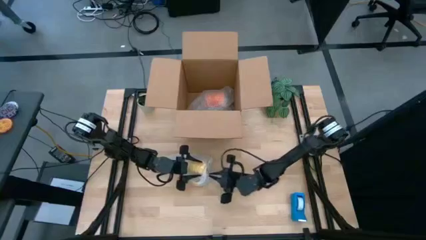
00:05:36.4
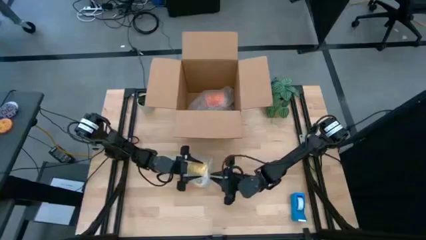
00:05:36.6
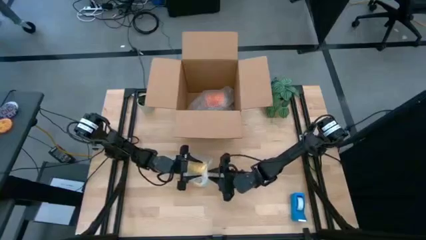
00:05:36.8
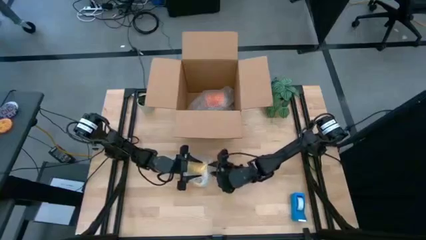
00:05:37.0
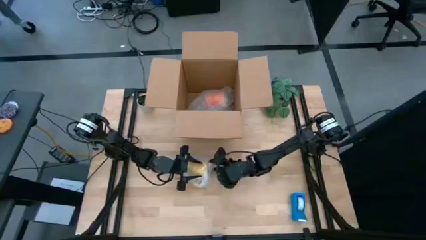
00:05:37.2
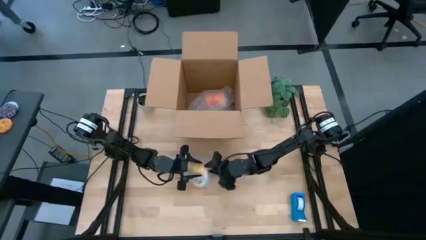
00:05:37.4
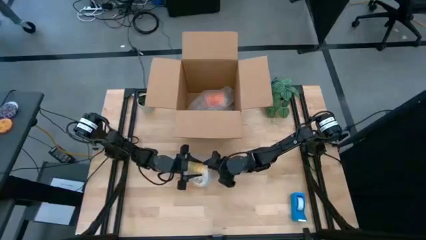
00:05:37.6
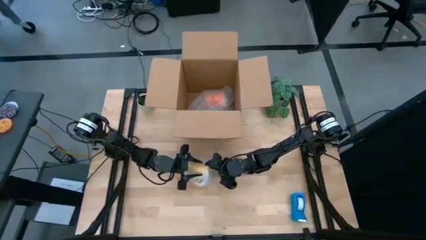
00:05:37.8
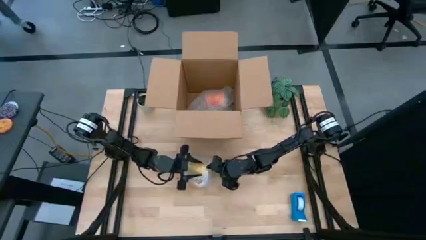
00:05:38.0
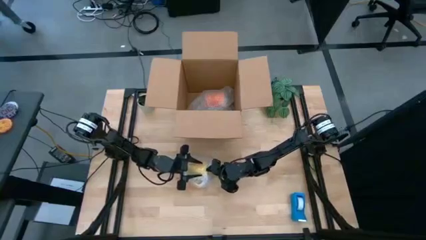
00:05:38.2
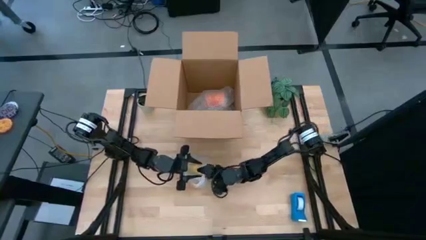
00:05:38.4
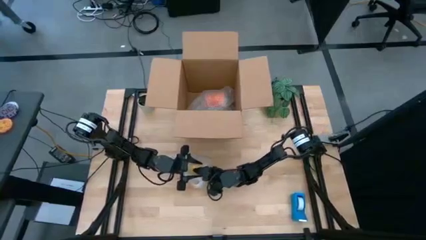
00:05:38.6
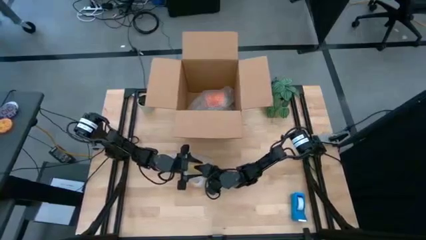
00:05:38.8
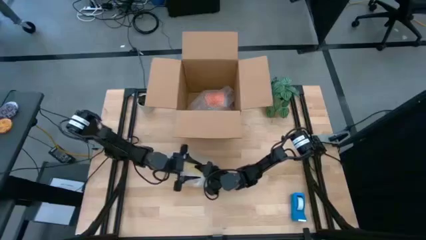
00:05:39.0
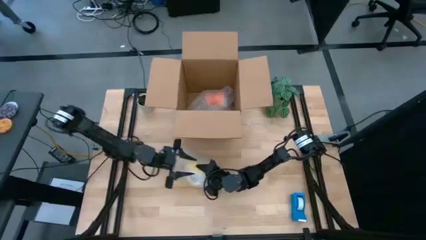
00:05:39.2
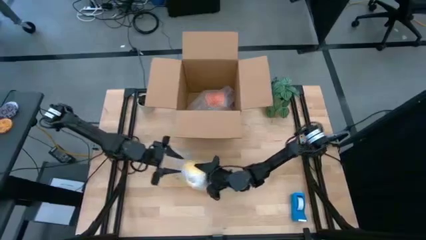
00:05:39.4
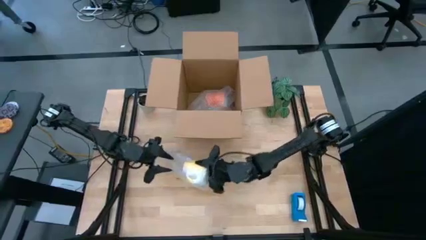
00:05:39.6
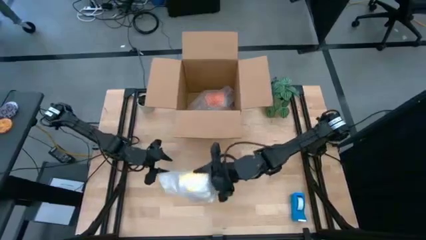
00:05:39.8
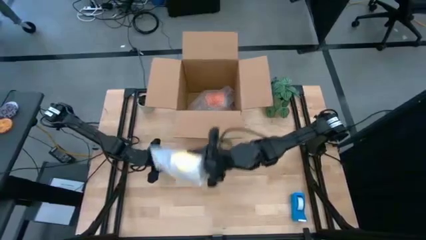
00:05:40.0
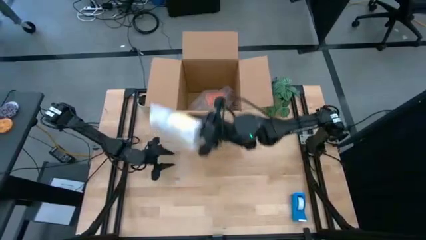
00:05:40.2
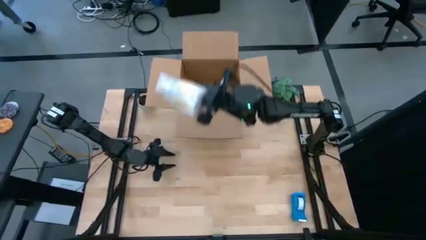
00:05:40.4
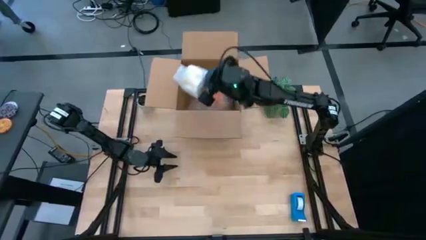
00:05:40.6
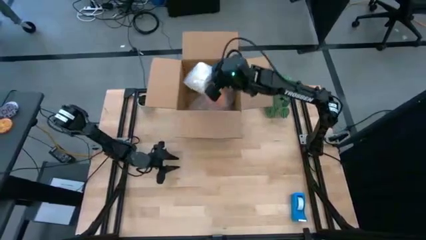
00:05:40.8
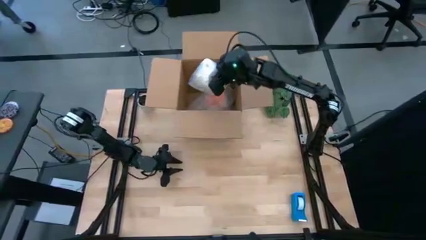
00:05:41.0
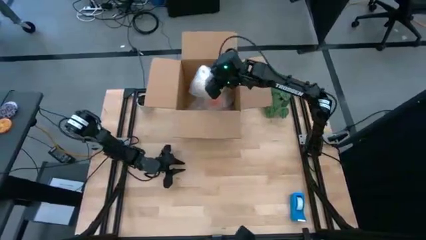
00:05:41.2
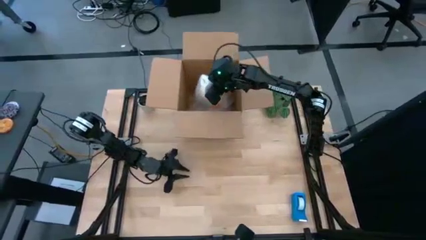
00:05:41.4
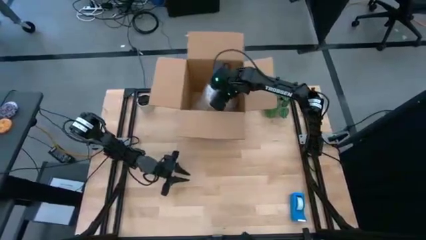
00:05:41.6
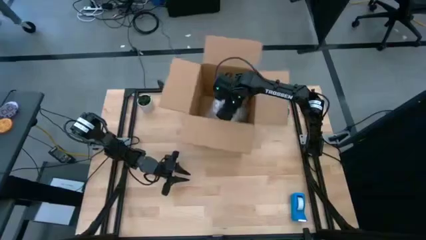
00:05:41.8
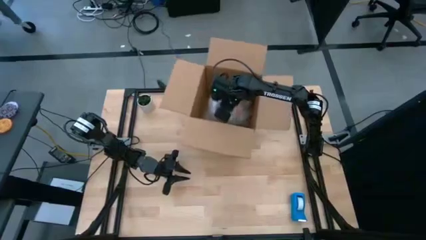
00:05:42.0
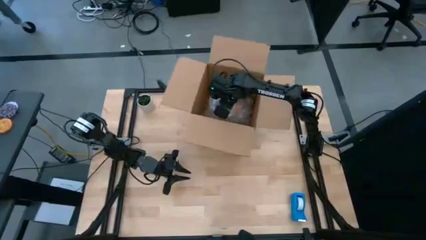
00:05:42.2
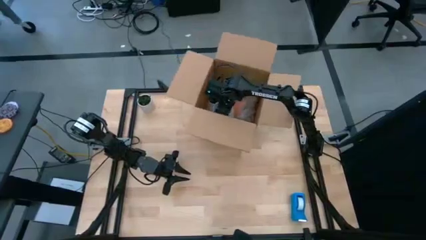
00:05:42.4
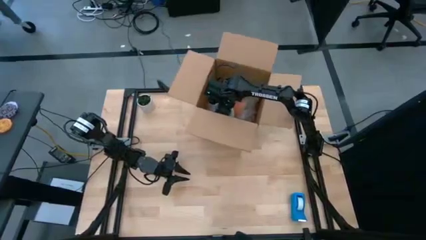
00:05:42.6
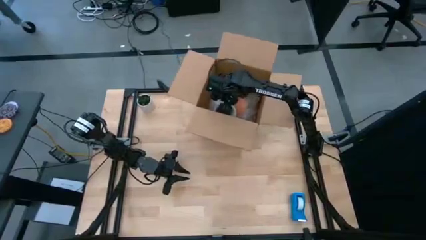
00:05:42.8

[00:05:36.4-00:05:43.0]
Task: wrap mug
Put the wrapped yellow mug into the box

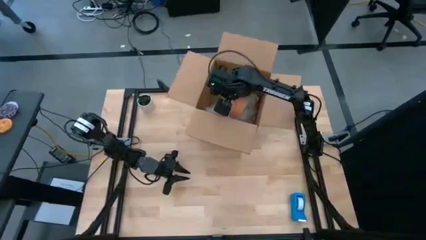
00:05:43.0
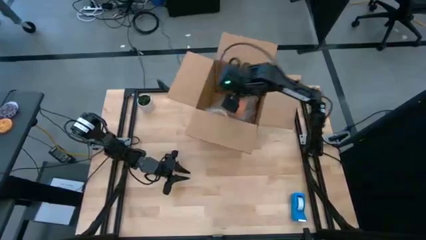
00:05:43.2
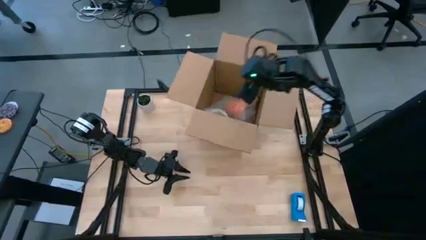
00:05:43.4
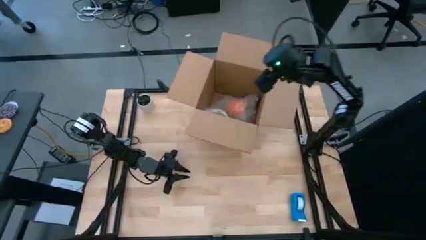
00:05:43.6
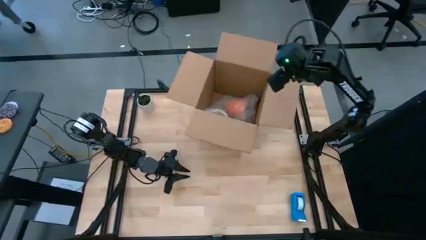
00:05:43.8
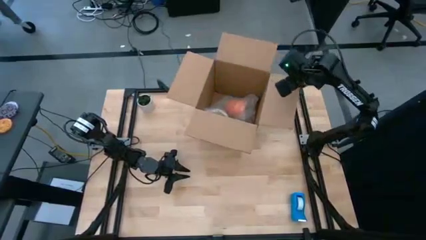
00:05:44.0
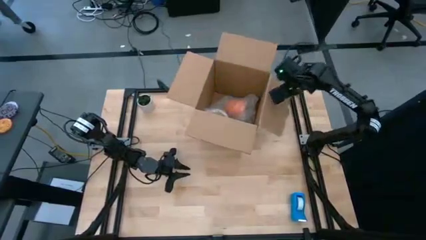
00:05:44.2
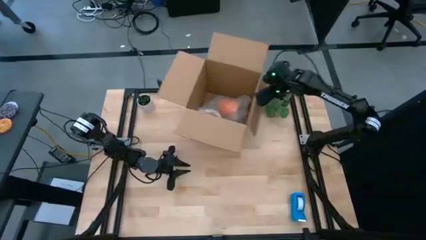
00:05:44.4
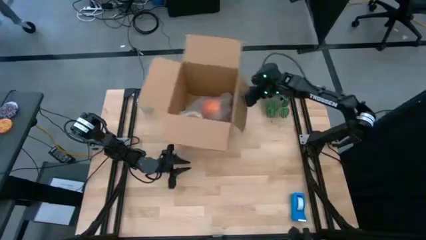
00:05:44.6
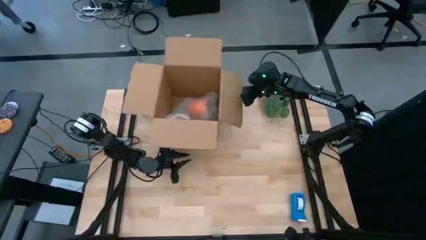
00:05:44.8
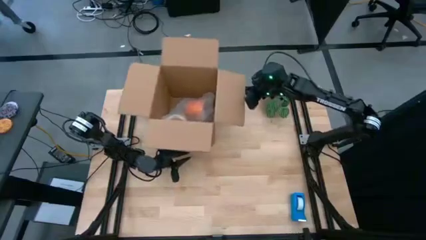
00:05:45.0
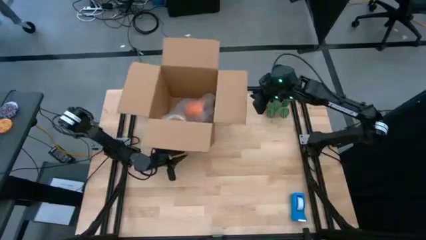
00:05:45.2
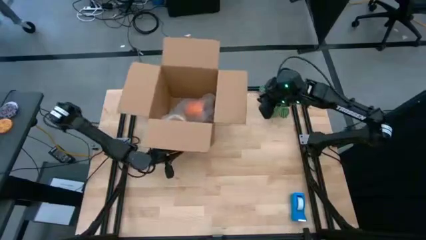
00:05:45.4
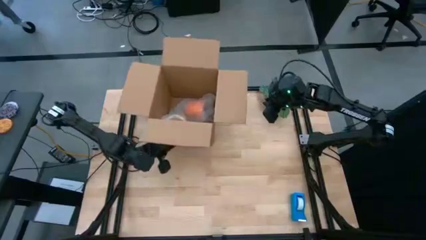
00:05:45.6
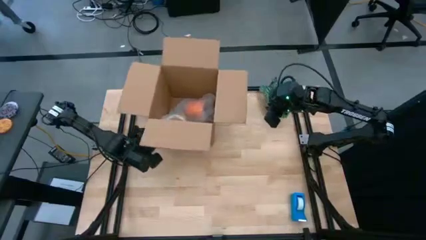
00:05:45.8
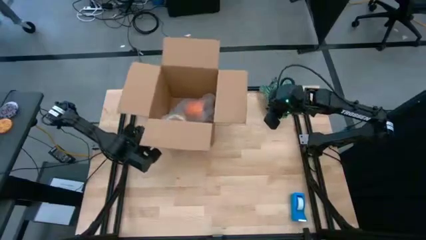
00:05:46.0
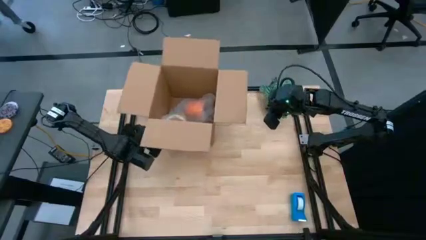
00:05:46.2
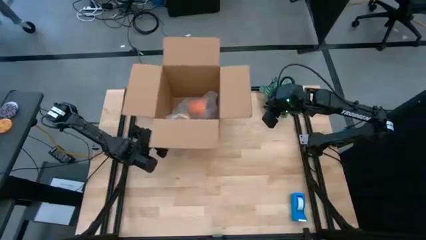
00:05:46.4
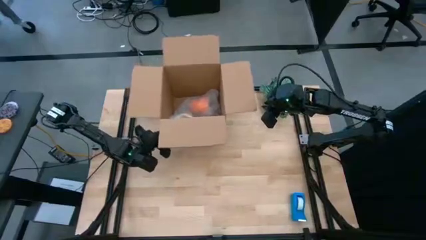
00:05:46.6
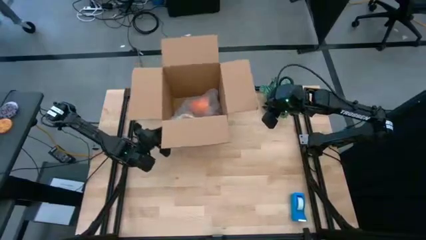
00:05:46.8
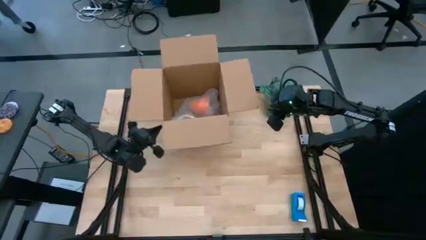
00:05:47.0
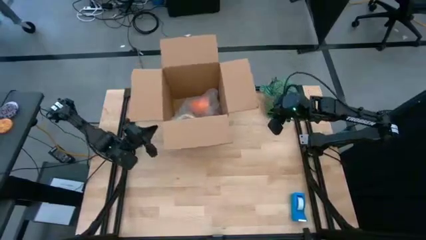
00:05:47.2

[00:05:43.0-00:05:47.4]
Adjust the cardboard box on the table

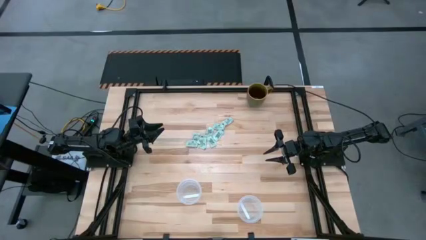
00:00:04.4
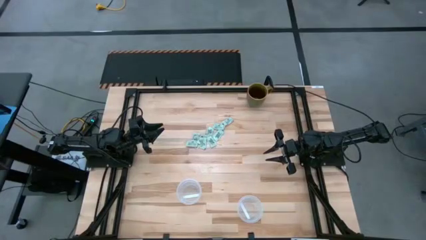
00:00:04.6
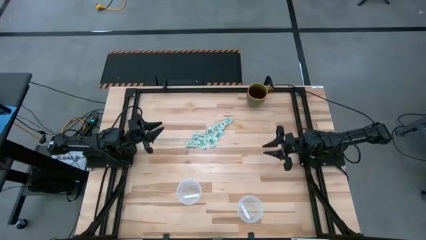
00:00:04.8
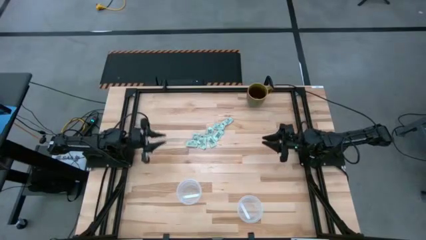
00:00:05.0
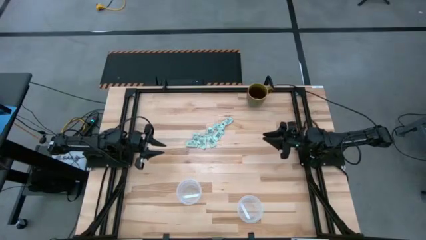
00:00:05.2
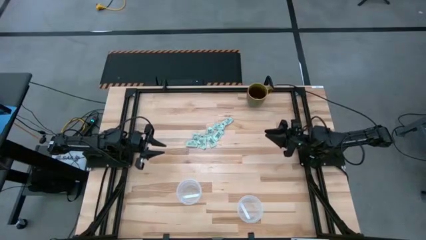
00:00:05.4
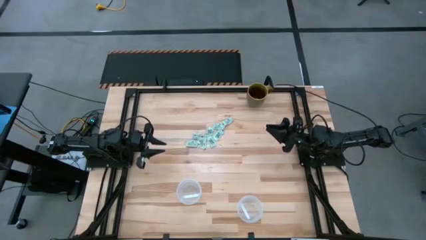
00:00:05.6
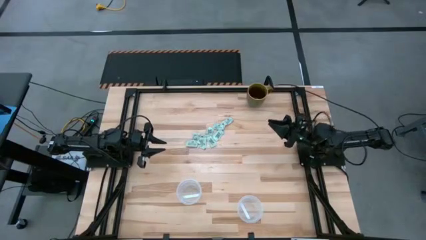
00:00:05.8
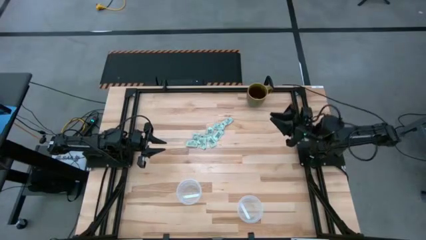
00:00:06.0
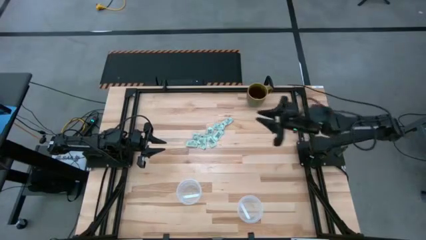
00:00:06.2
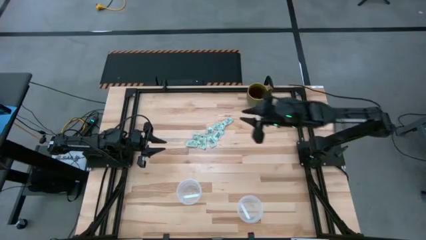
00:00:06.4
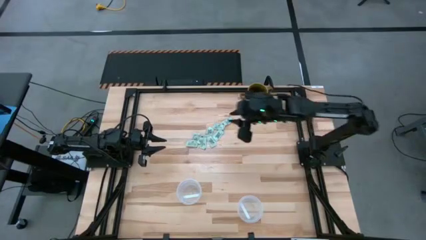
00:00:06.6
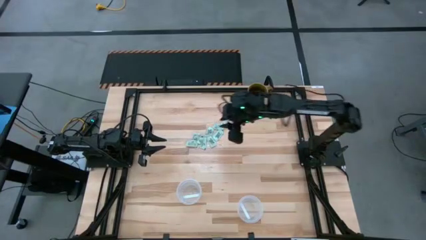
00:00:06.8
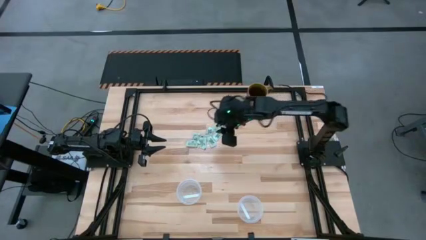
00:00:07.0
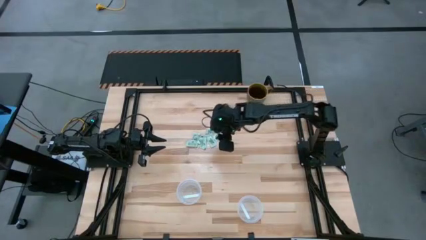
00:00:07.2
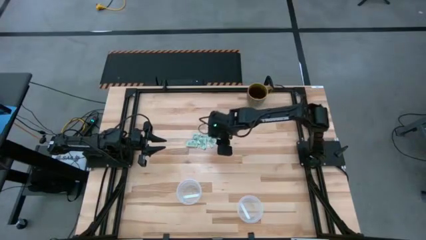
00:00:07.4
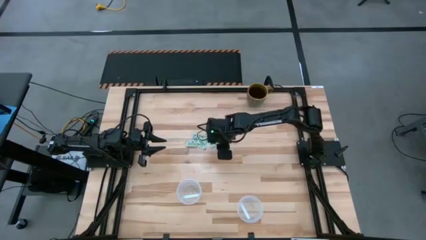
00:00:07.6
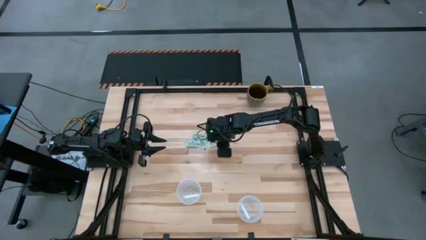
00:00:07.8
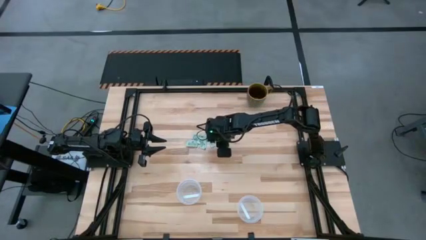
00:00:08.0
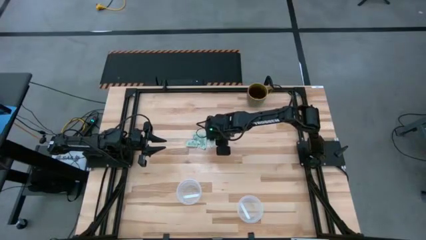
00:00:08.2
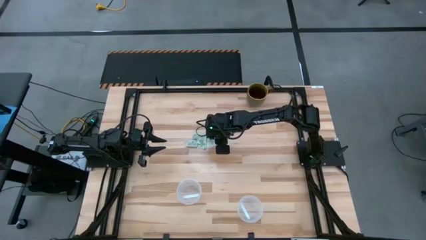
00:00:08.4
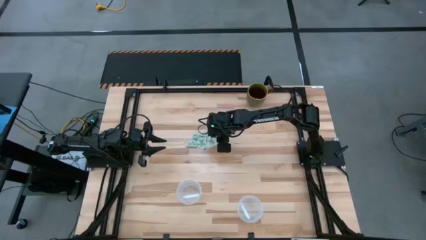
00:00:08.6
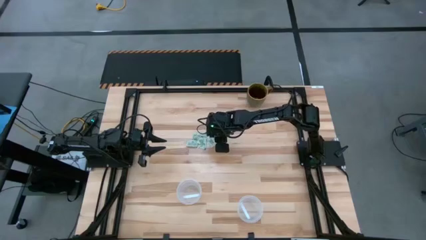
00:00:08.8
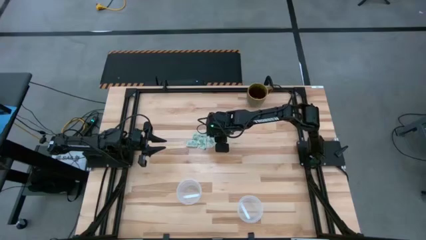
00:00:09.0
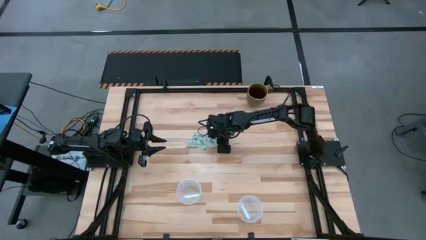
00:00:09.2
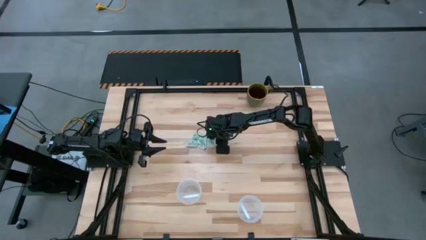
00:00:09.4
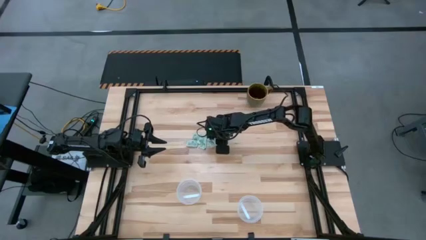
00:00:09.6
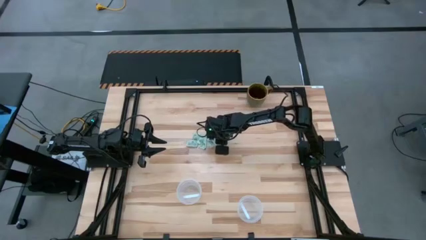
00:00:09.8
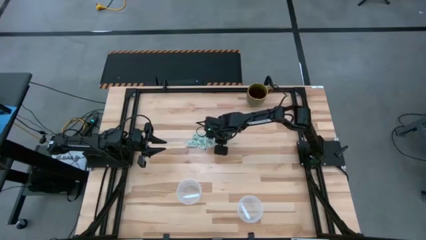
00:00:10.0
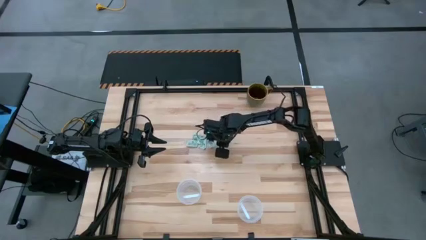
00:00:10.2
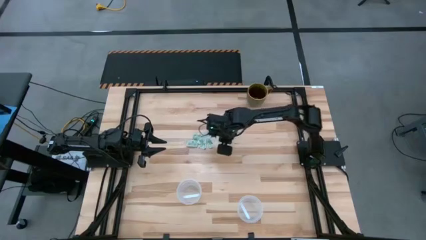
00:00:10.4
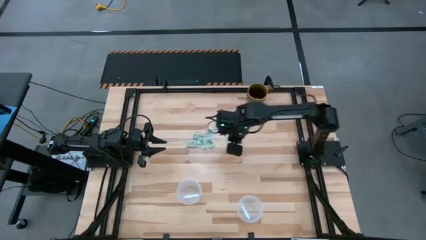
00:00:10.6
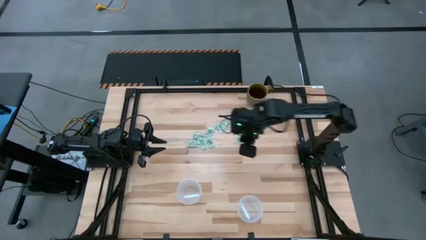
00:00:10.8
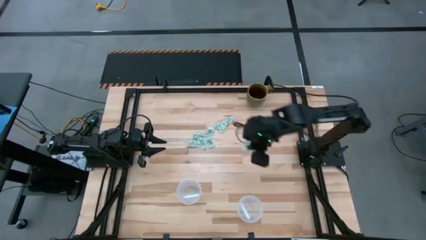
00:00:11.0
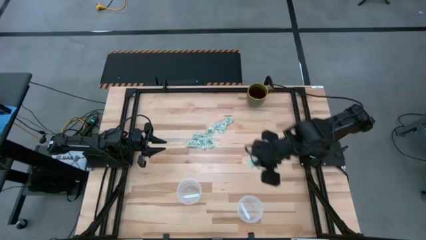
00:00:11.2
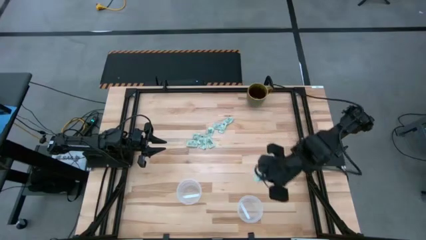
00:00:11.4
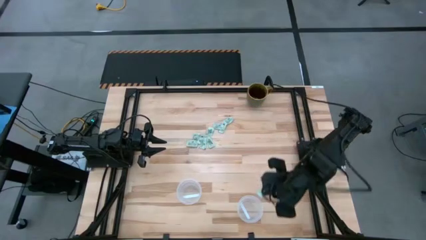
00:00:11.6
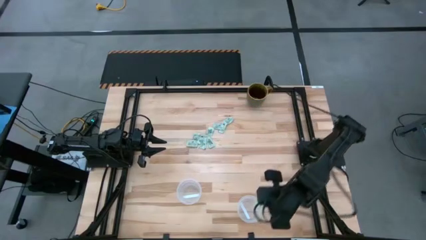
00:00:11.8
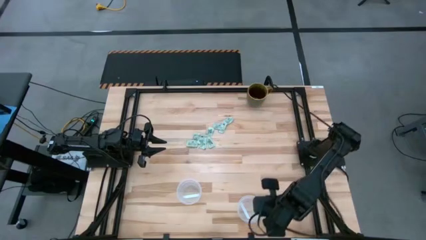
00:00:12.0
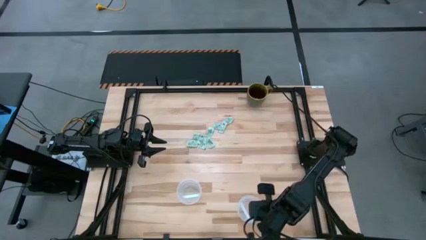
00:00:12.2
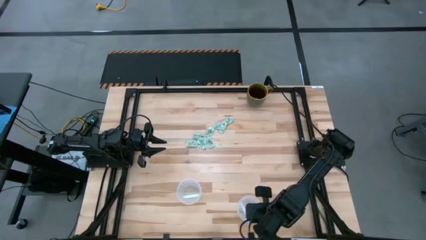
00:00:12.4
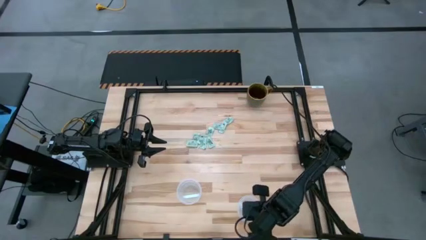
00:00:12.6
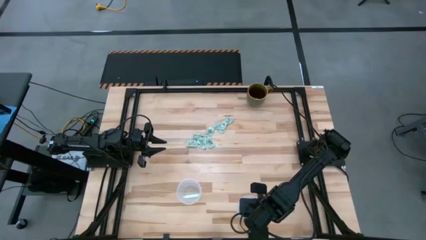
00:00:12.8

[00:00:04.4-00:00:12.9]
Task: Pick and place items into bin
Put the stevia packet into the right transparent bin
